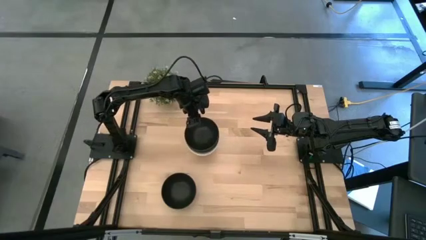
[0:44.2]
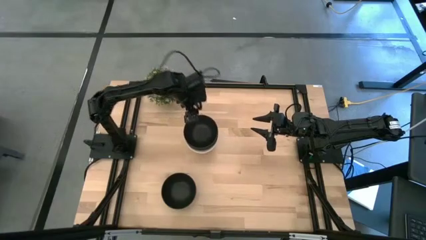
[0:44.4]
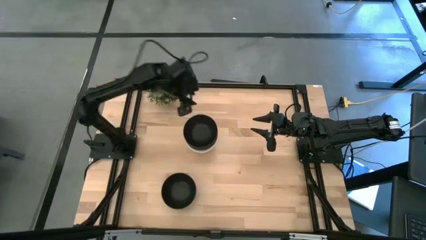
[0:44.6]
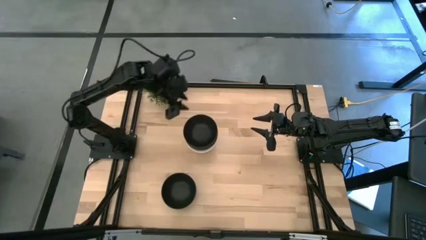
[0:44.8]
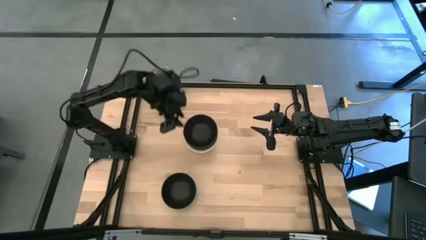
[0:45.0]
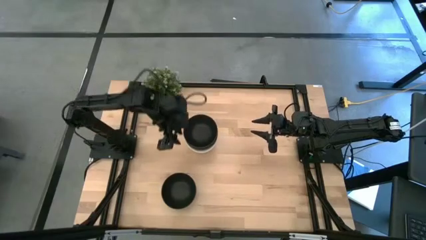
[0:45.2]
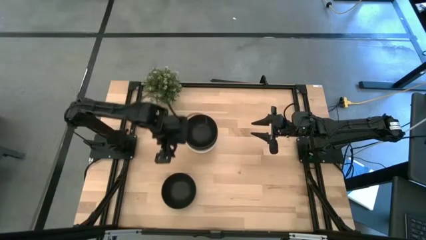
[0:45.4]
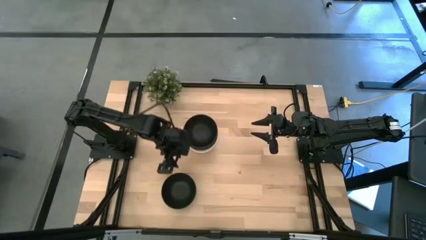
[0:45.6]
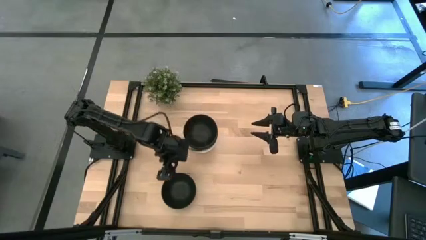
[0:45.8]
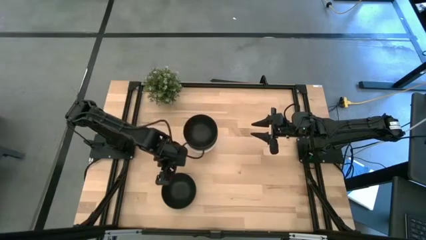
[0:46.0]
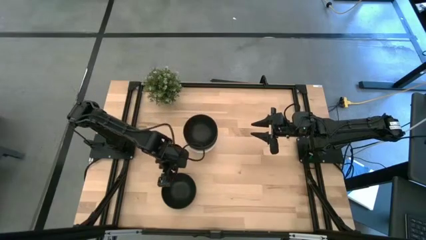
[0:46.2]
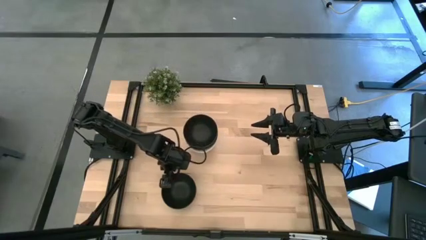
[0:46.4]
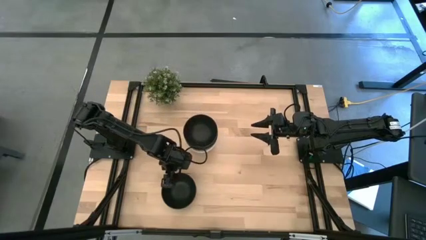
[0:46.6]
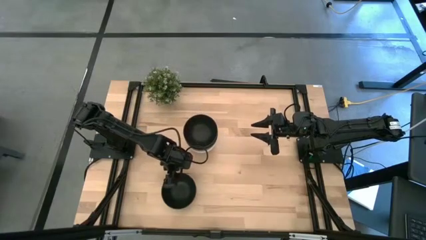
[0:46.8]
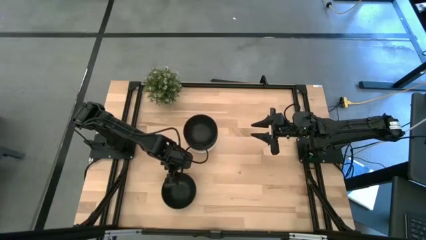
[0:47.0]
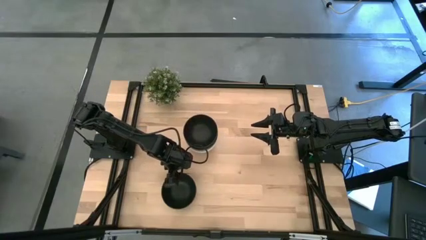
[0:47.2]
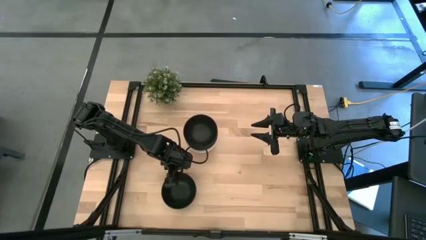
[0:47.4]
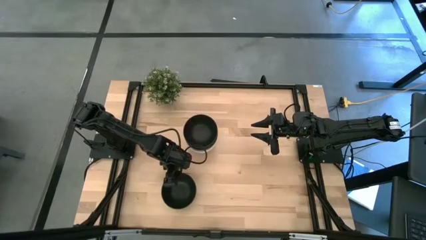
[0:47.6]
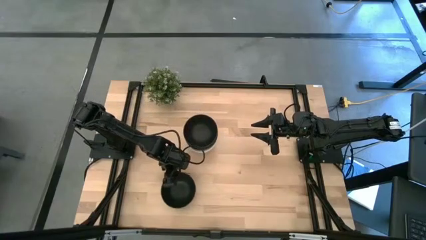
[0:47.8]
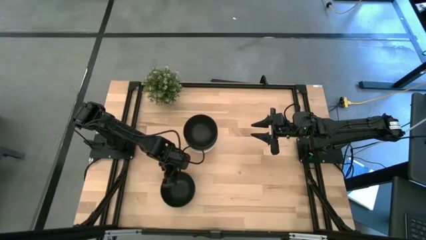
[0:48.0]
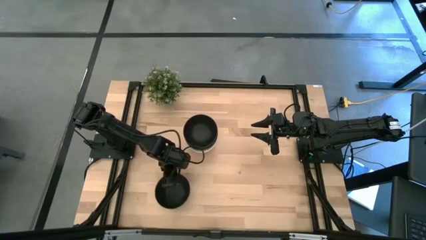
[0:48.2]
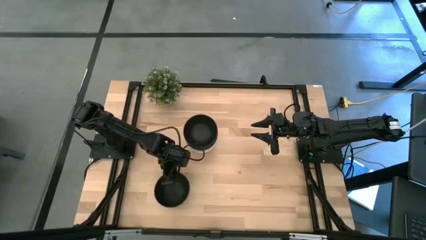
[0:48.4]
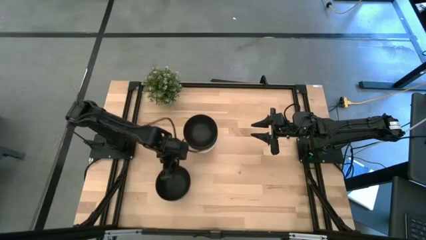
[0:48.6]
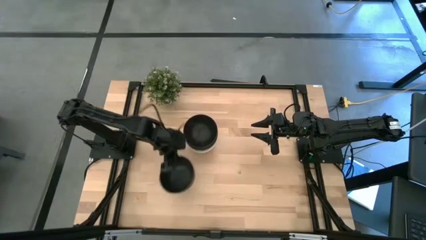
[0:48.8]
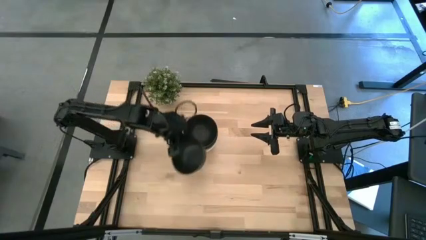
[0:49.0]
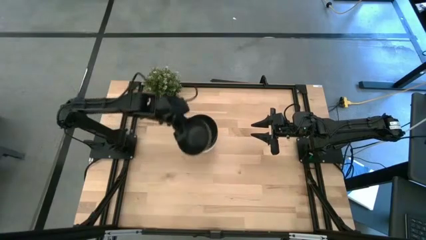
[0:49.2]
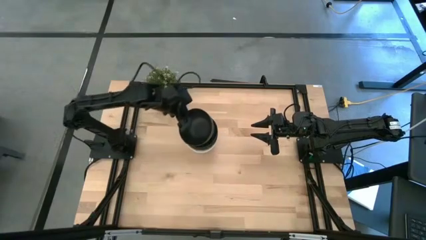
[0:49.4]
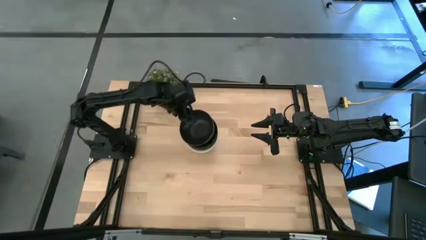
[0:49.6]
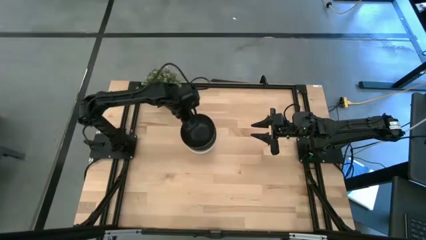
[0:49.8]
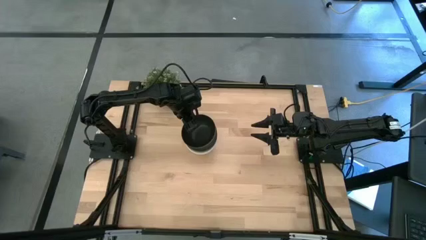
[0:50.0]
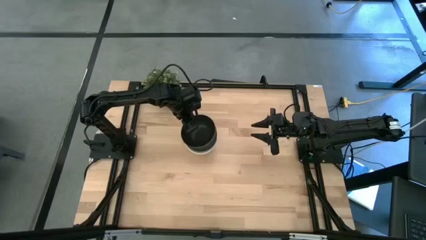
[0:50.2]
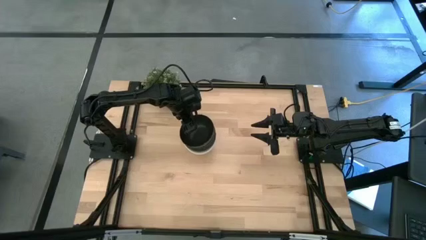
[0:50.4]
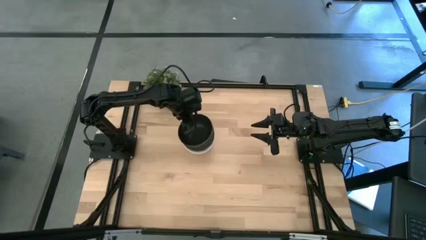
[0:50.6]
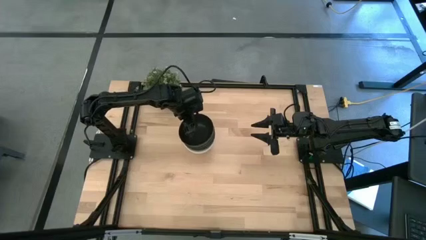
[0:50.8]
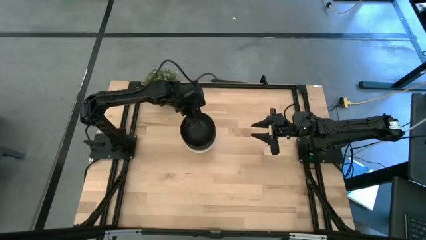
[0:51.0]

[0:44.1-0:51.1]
Task: Nest bowls inside each other
Stack the black bowl on the black bowl

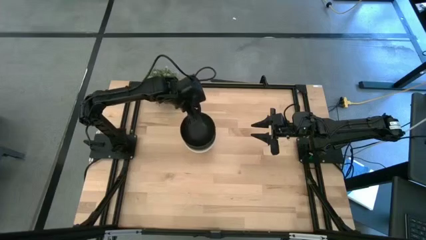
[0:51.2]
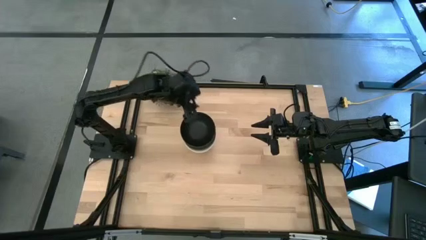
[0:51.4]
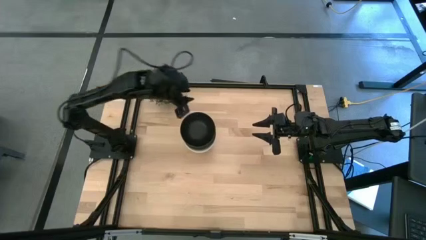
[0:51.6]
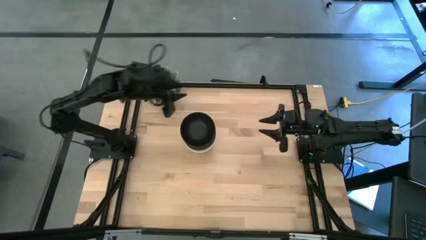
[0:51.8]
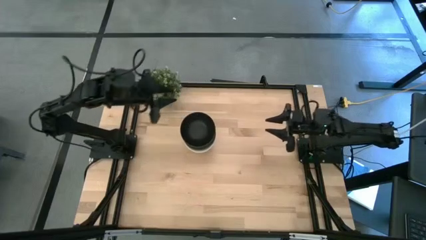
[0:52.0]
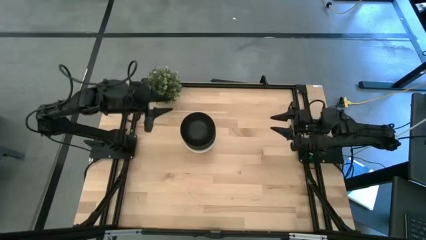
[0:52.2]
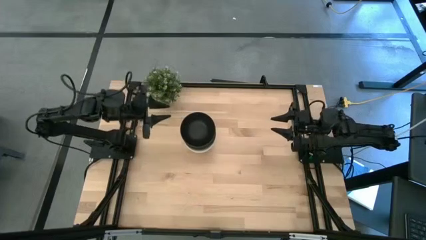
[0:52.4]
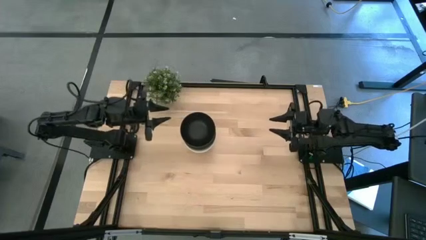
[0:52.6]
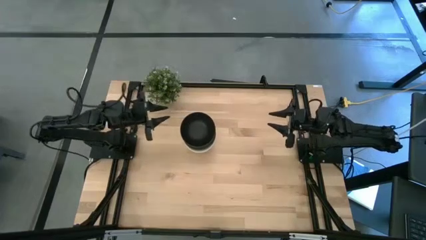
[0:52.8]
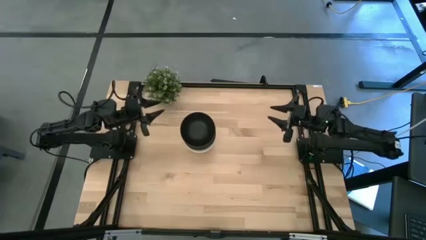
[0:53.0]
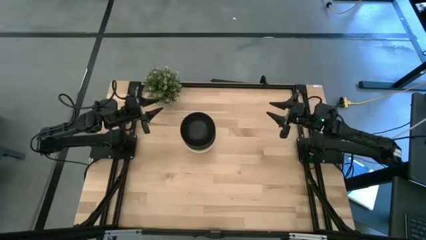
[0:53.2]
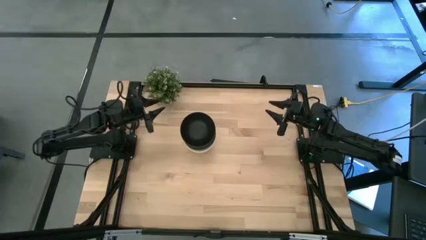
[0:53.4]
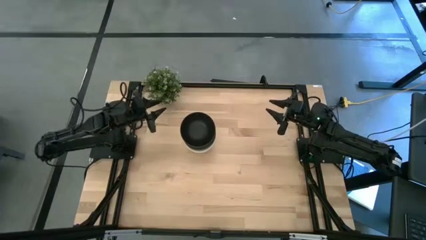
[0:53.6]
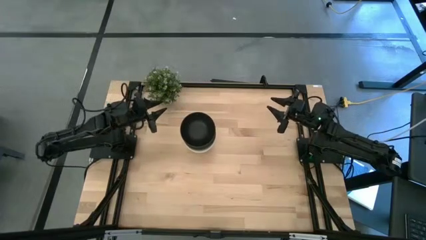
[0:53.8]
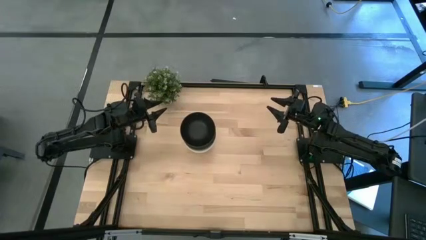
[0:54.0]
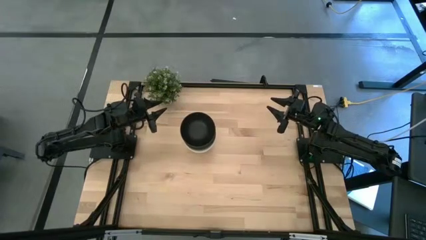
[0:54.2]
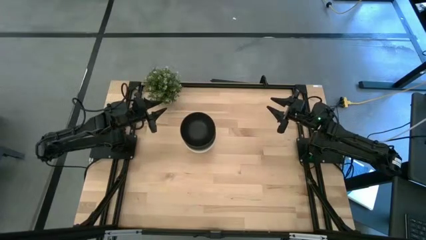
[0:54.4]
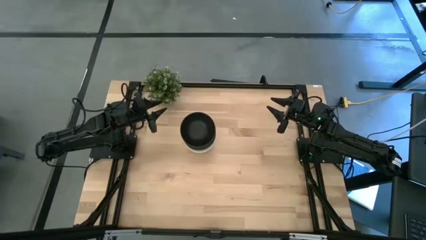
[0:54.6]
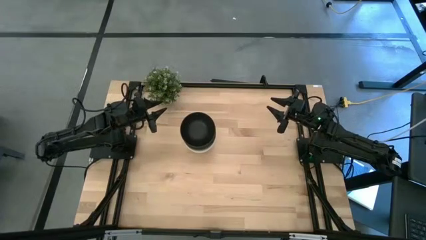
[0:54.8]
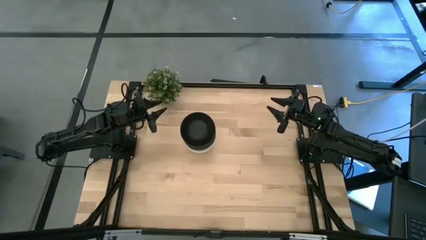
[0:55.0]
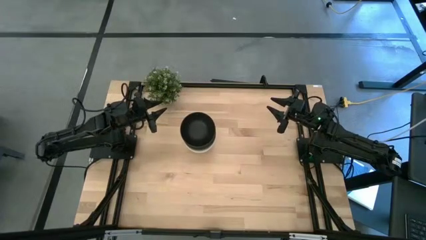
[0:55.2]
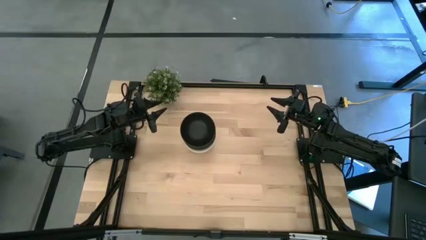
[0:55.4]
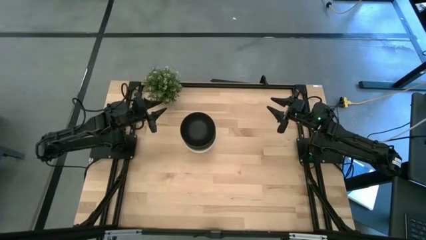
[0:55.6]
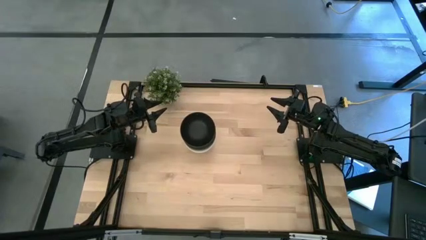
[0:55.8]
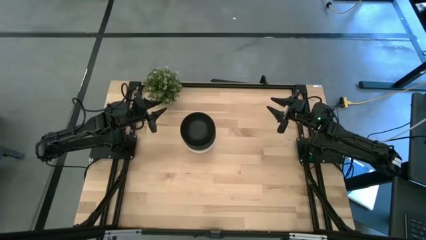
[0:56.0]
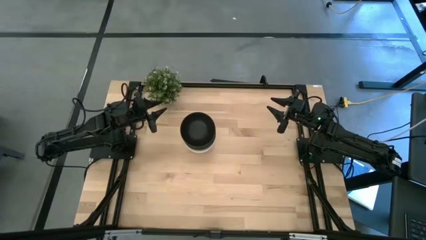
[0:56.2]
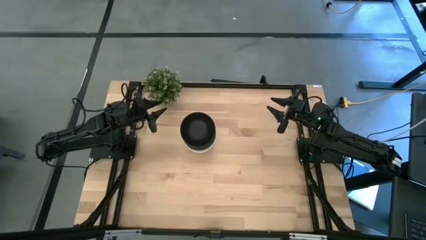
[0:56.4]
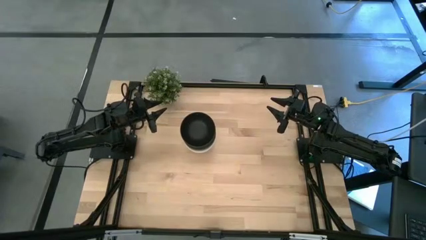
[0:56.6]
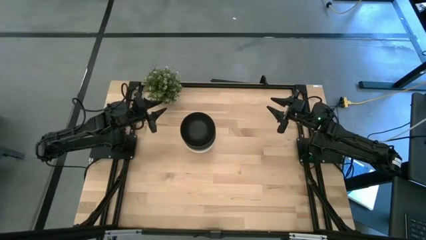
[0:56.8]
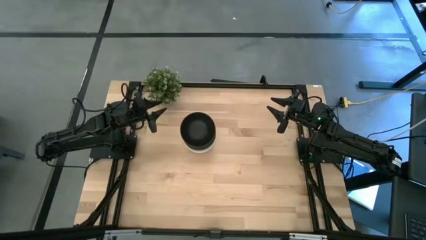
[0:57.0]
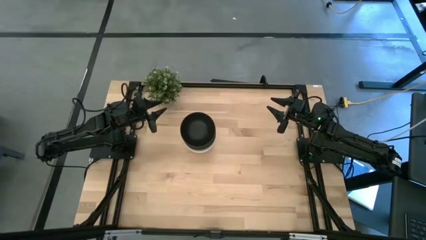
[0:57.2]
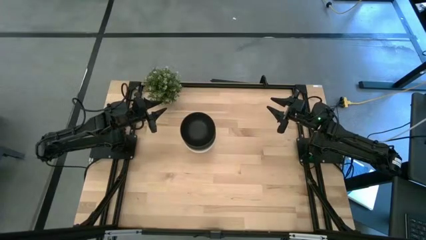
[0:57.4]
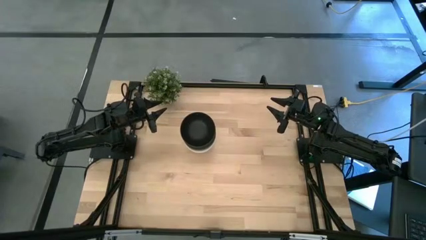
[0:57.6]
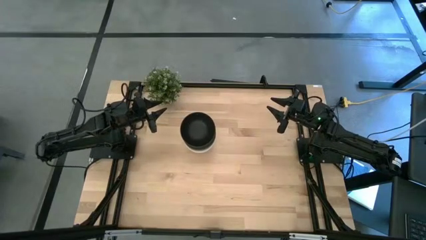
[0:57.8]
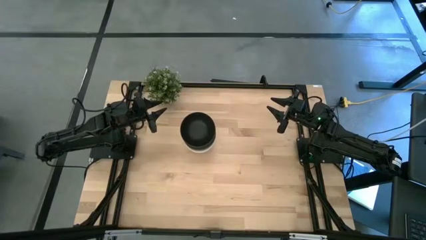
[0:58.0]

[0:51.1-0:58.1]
Return to Home Position

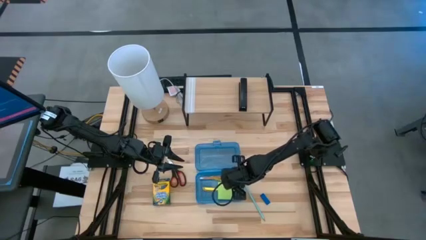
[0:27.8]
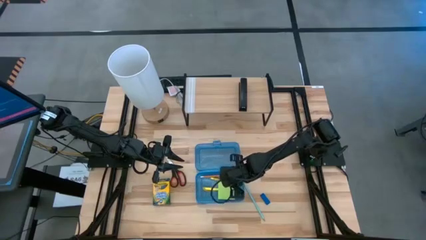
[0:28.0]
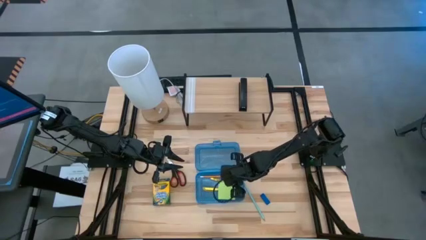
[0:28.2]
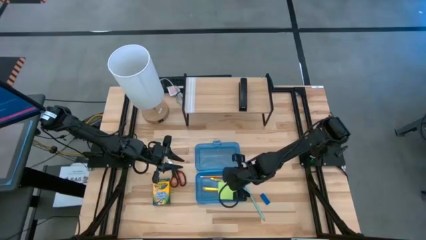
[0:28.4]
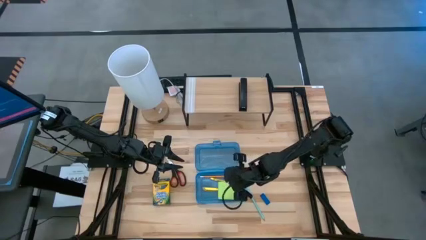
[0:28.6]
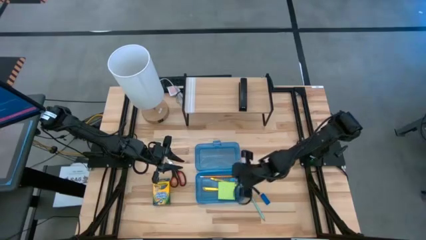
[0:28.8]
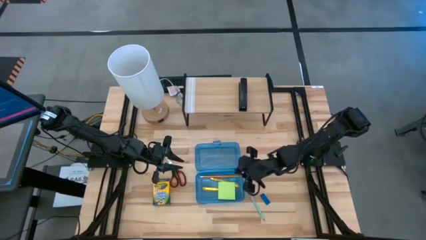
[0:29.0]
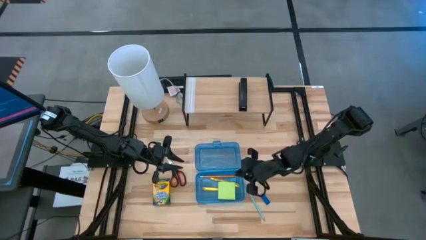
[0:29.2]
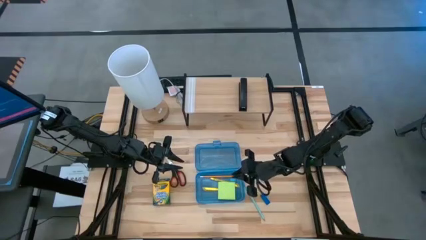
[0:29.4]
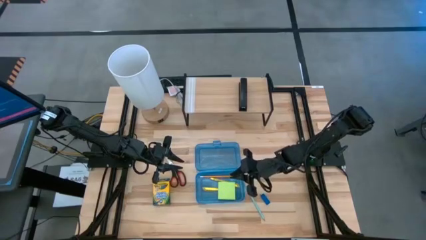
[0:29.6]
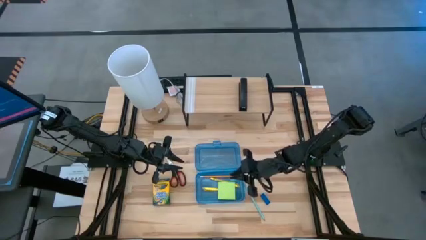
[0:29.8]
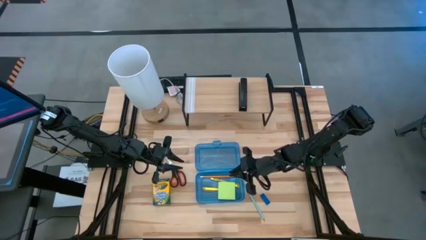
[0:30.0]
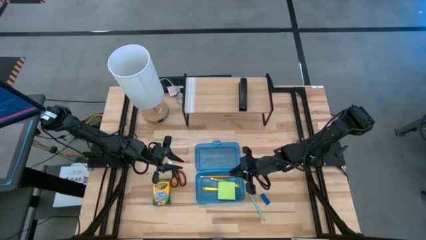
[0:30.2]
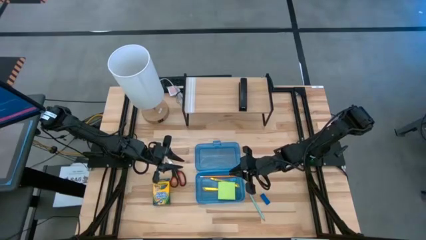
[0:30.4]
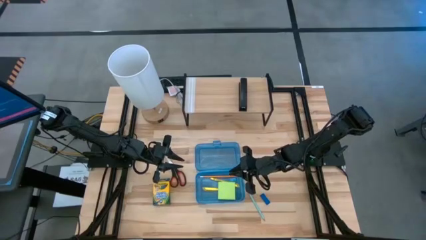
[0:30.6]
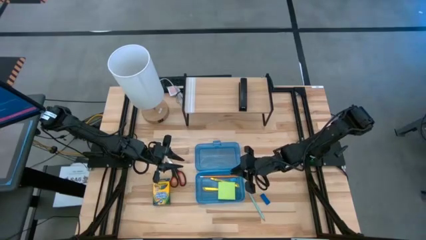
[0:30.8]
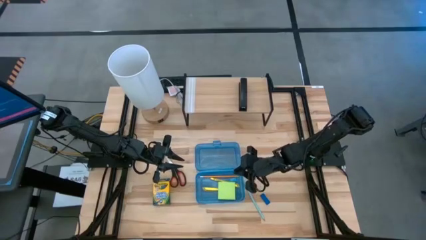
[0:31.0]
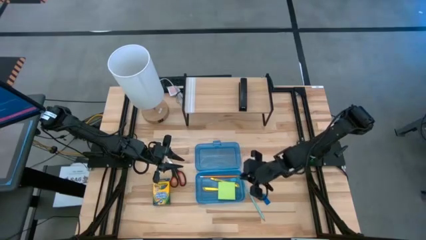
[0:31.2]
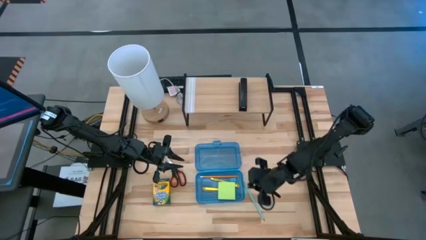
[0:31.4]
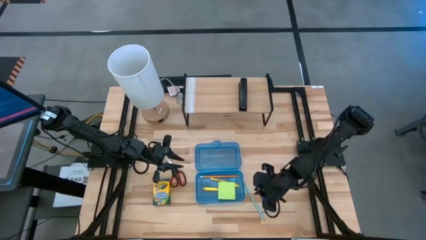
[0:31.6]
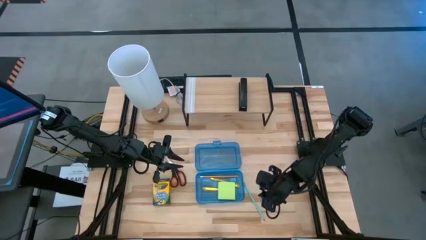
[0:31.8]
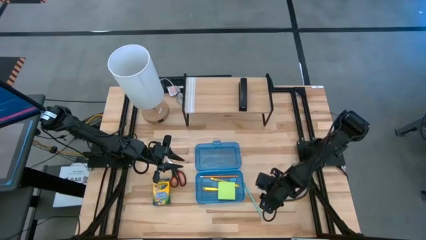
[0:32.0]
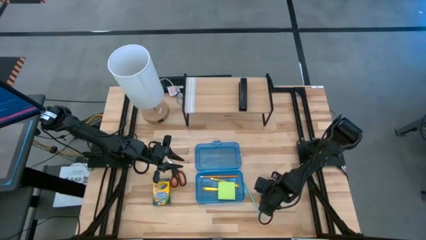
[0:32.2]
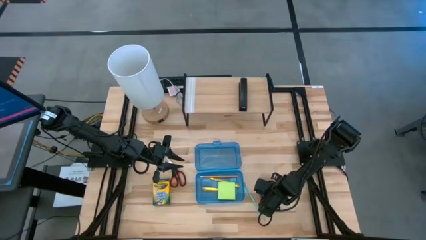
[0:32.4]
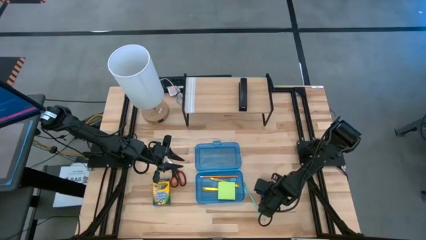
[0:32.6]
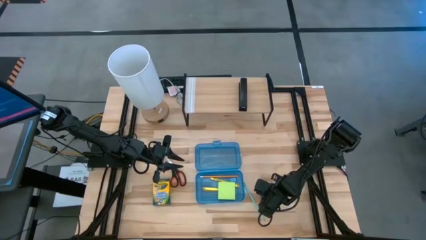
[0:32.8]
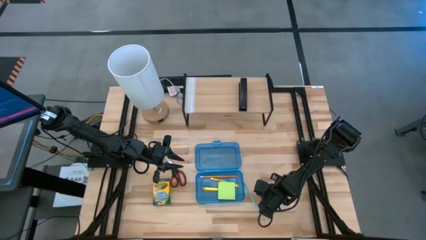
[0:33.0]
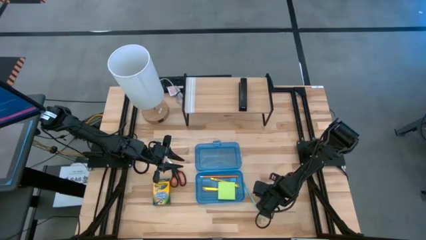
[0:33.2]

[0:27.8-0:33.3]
Task: Pack school essentials
Put the blue eraser into the blue supply box
